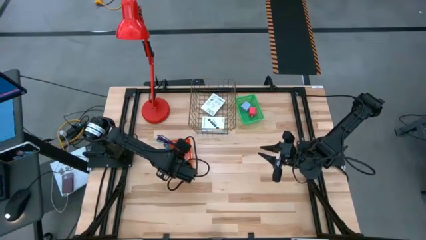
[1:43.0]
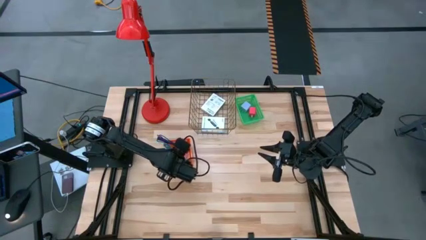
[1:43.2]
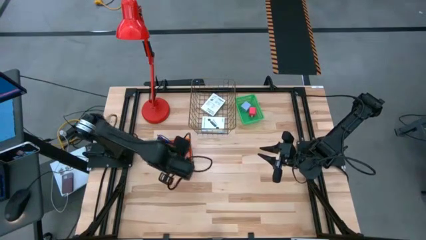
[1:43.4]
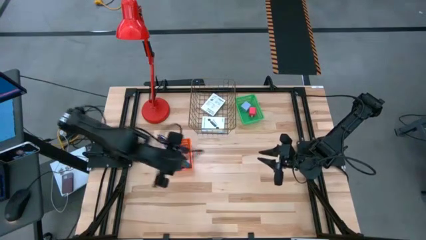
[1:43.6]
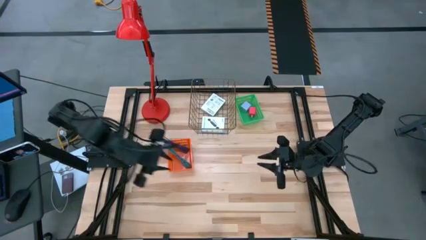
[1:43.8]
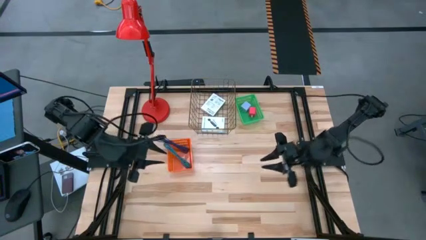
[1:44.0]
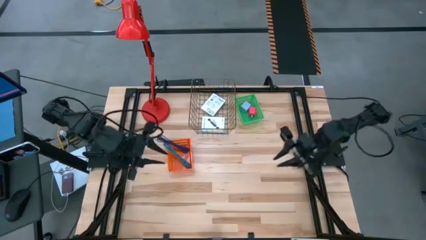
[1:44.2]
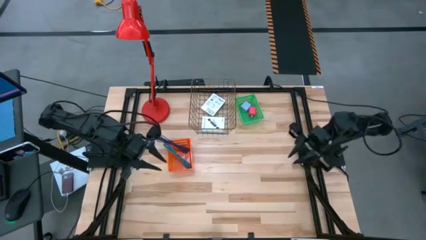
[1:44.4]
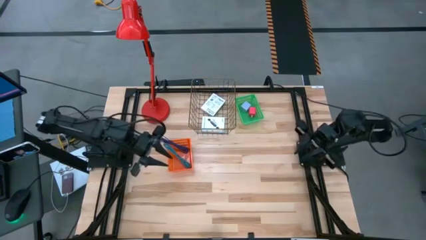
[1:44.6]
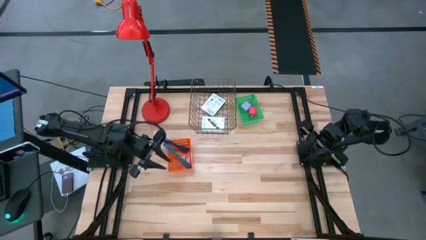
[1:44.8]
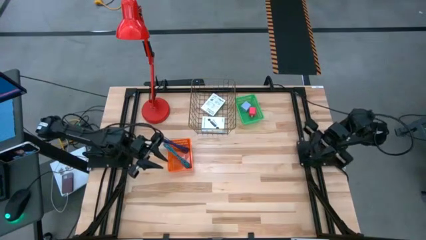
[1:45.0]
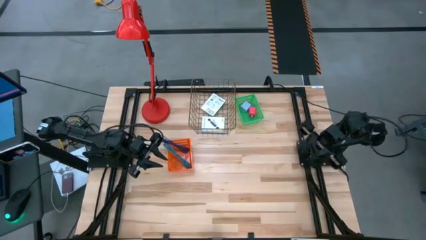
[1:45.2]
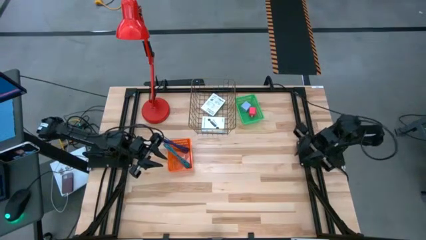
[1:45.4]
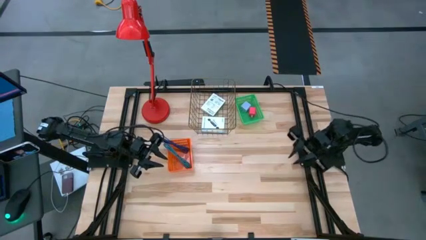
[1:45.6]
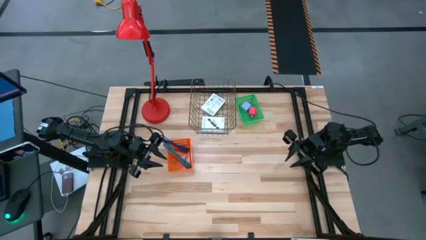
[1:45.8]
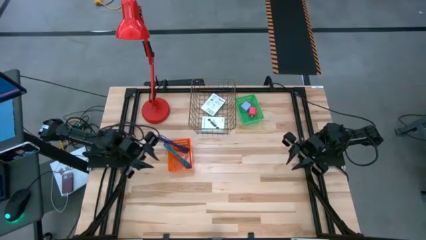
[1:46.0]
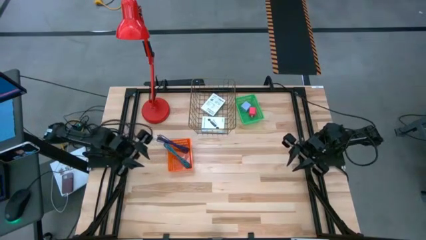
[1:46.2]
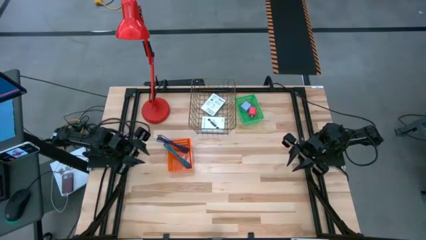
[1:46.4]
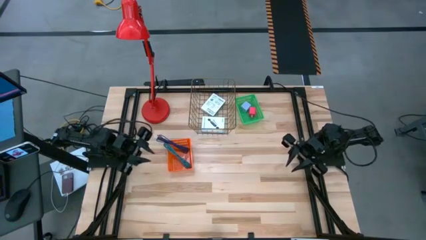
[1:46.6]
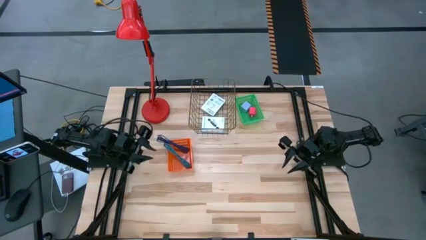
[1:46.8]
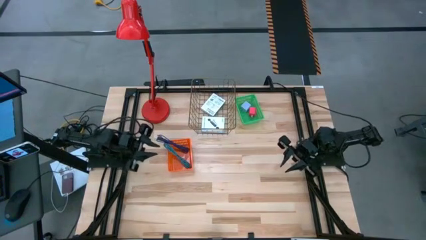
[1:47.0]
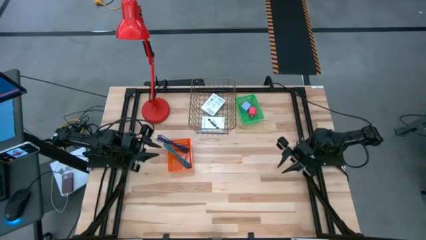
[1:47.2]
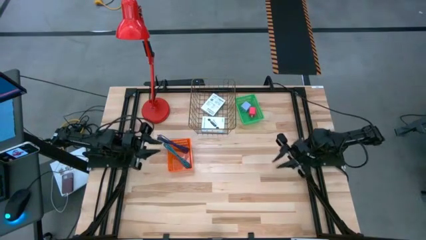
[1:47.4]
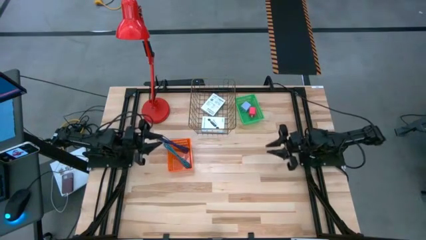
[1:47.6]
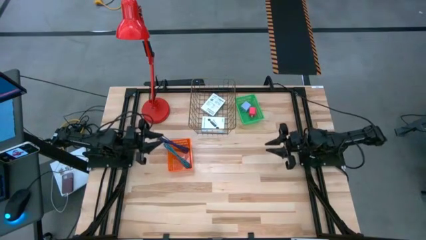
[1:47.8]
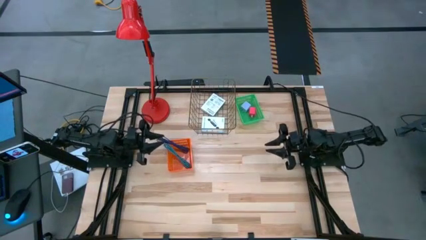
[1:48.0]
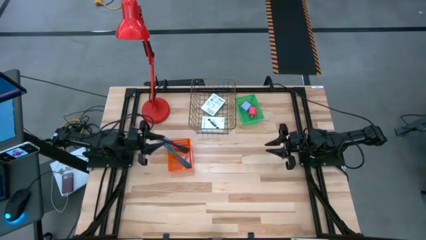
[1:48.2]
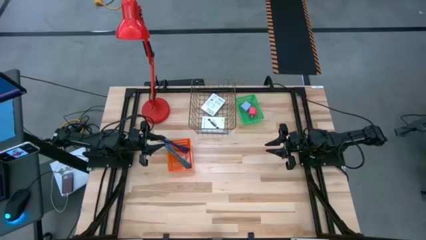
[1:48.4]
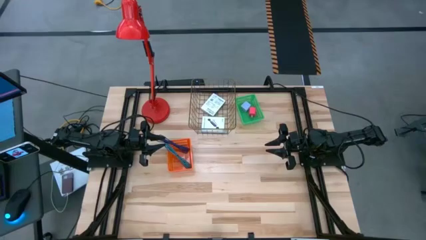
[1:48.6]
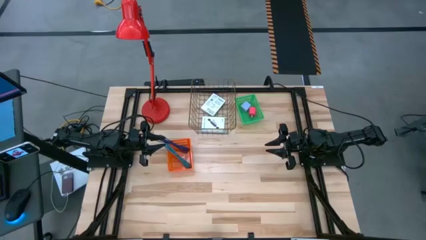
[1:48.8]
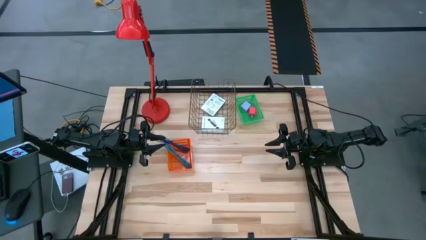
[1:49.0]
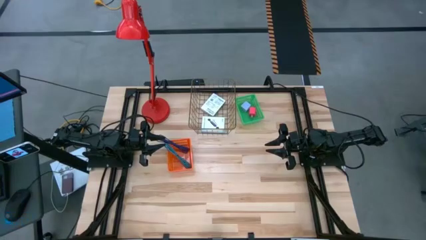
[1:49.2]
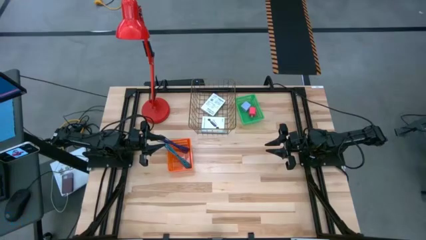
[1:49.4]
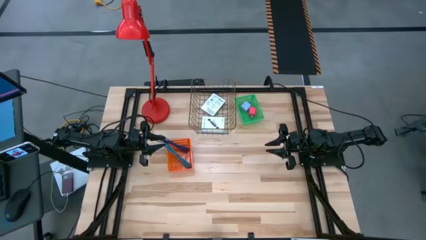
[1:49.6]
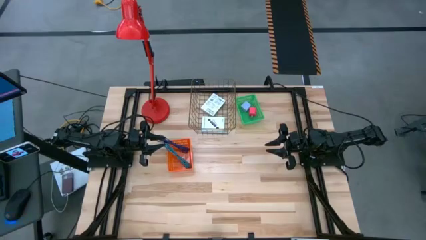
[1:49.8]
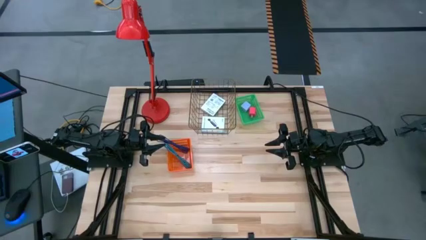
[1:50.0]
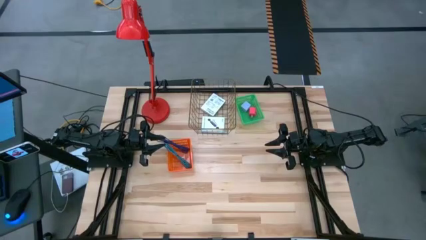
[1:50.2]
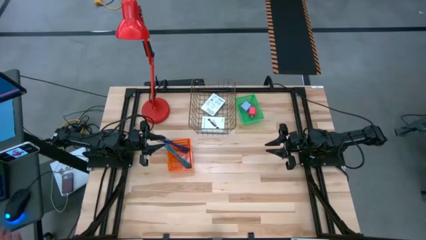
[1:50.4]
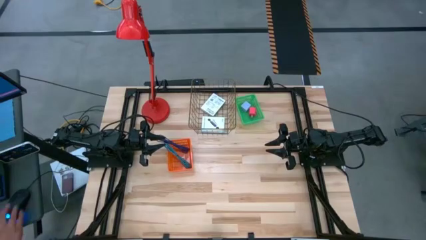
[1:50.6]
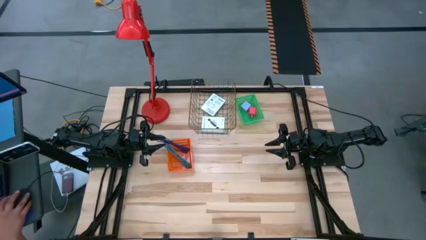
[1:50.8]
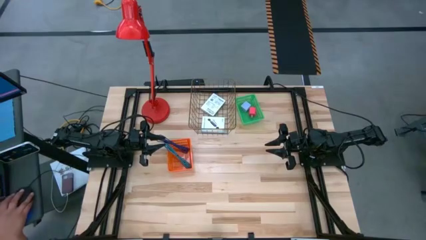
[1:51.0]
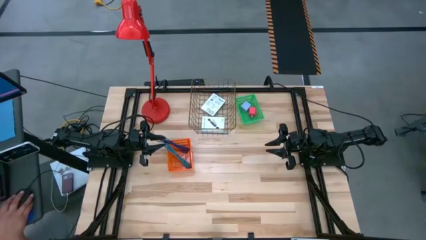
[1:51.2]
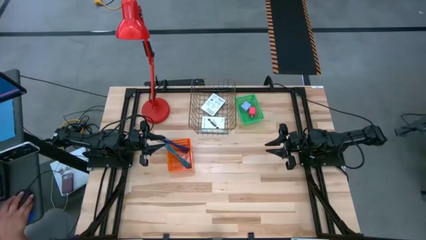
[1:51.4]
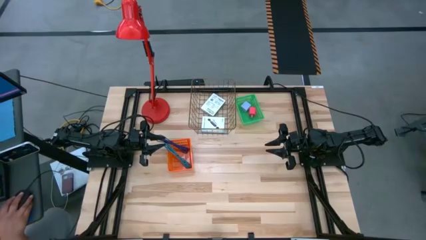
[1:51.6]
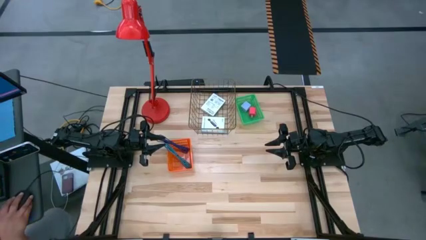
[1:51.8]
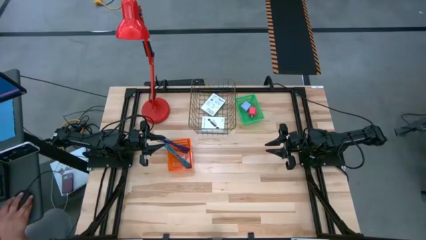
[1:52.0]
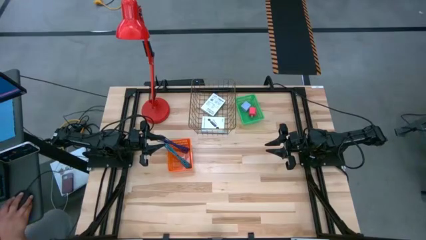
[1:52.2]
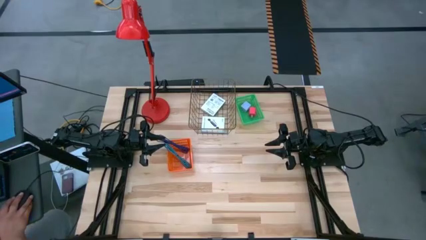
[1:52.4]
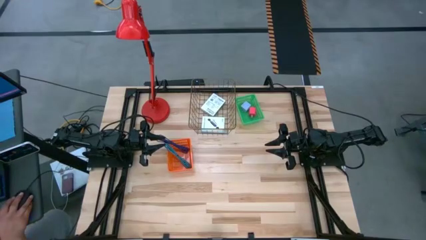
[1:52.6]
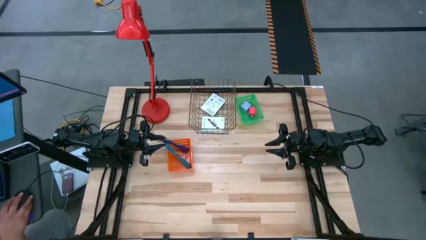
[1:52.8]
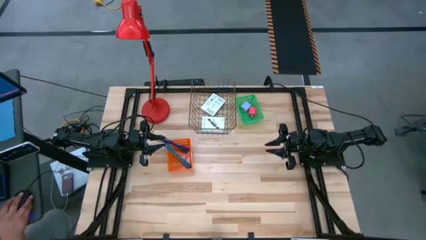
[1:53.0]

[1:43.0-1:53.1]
Task: Pick and place items into bin
Return to Home Position

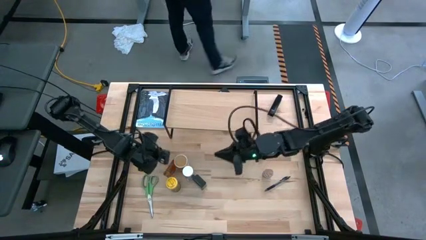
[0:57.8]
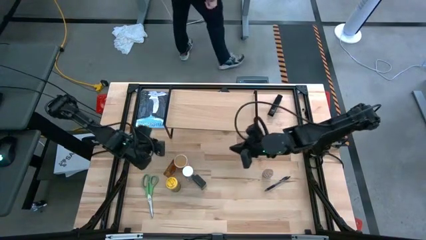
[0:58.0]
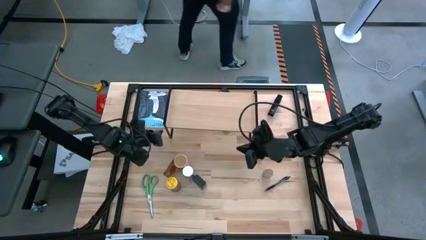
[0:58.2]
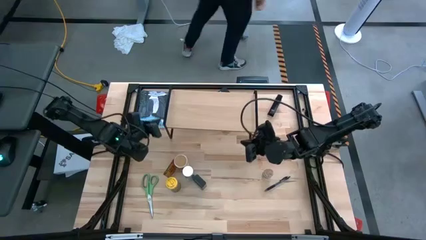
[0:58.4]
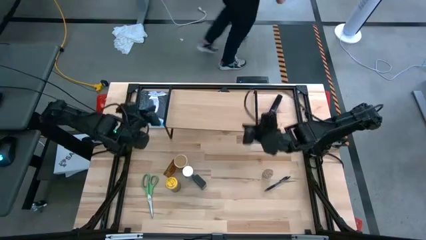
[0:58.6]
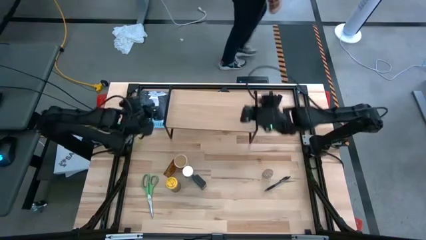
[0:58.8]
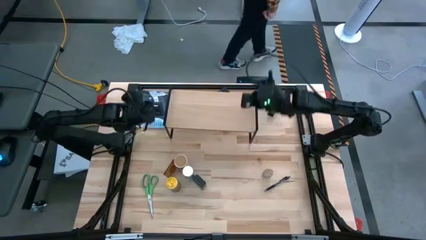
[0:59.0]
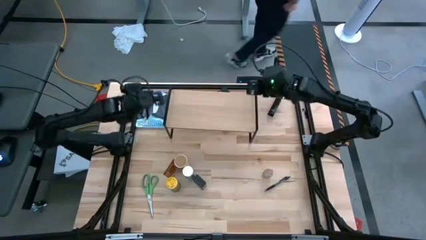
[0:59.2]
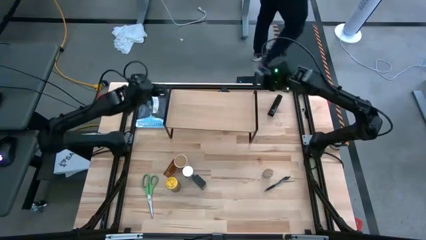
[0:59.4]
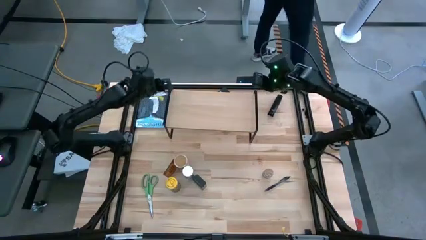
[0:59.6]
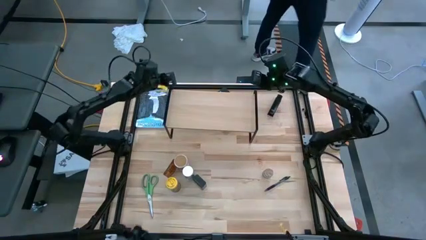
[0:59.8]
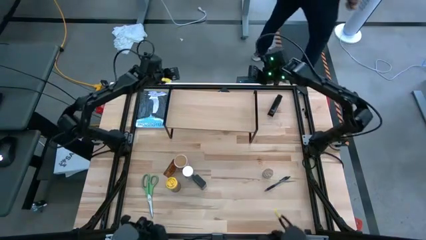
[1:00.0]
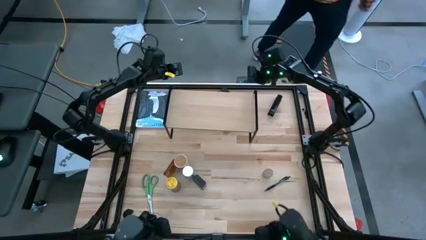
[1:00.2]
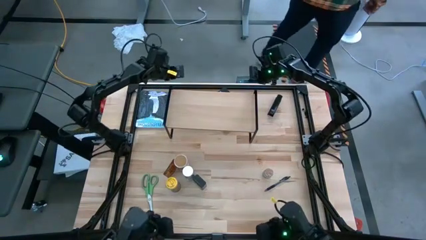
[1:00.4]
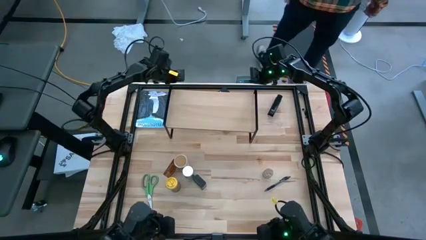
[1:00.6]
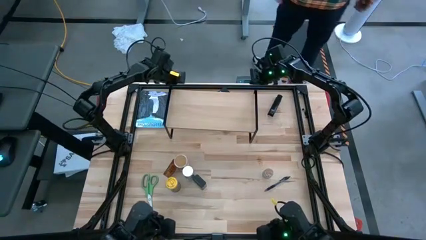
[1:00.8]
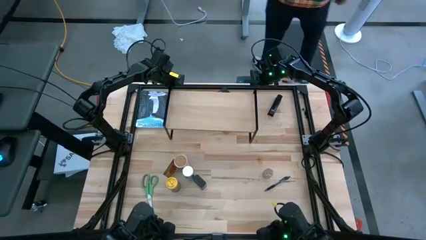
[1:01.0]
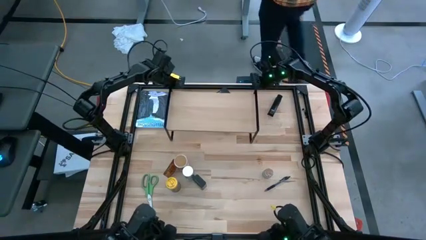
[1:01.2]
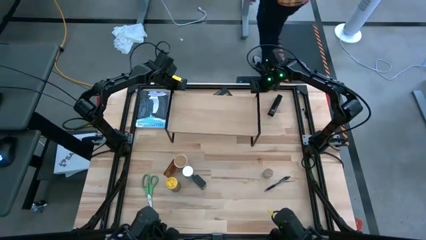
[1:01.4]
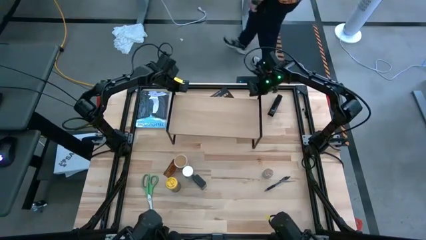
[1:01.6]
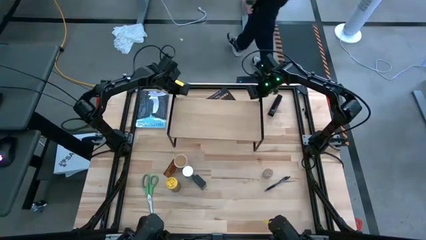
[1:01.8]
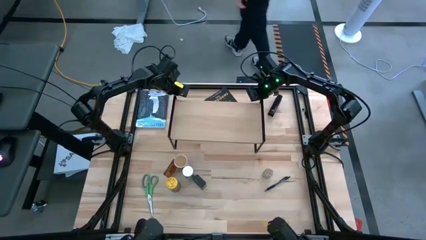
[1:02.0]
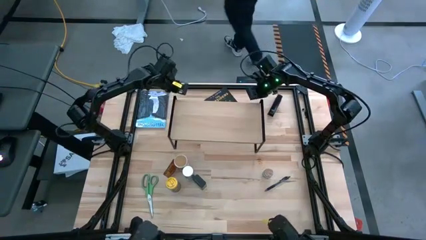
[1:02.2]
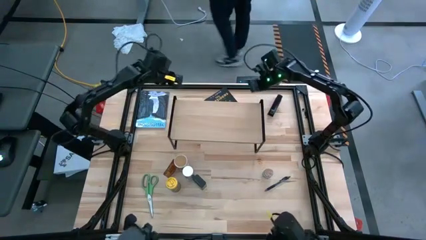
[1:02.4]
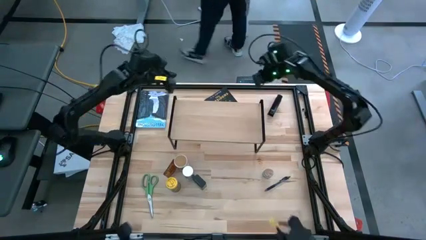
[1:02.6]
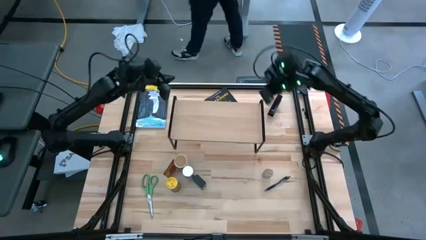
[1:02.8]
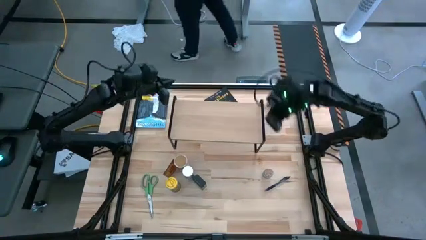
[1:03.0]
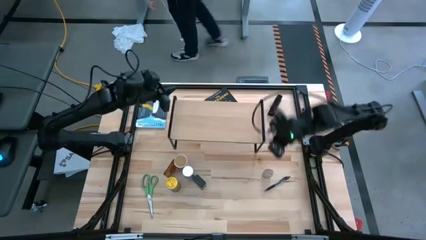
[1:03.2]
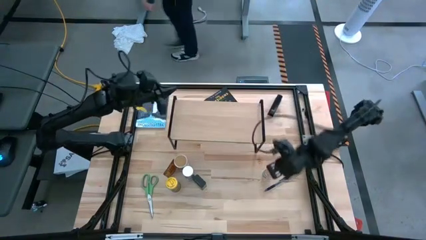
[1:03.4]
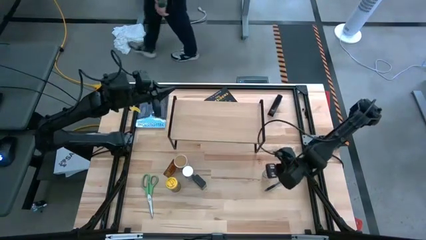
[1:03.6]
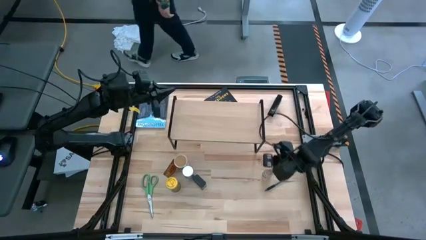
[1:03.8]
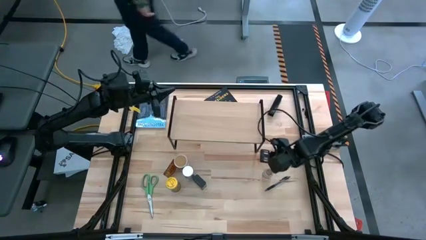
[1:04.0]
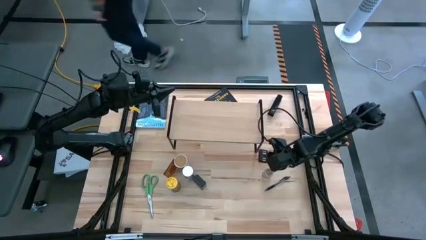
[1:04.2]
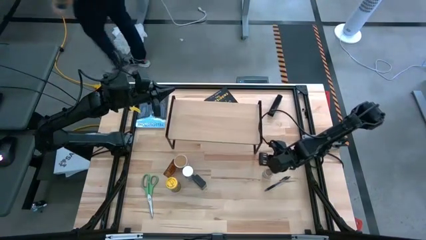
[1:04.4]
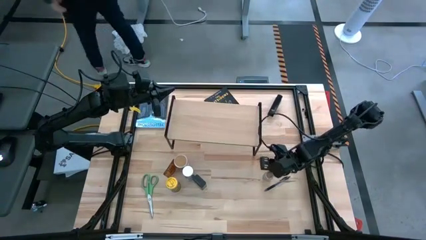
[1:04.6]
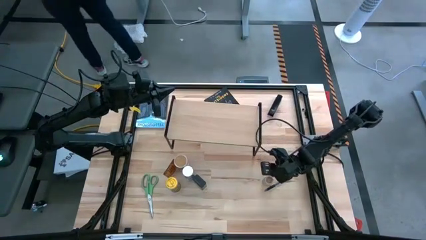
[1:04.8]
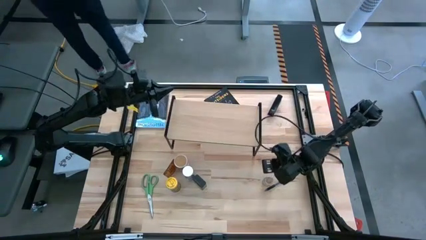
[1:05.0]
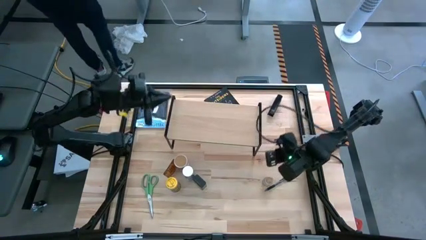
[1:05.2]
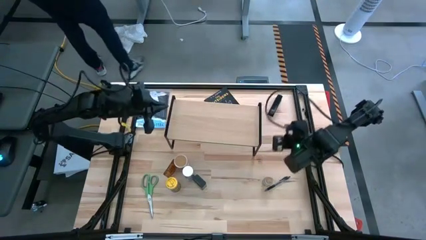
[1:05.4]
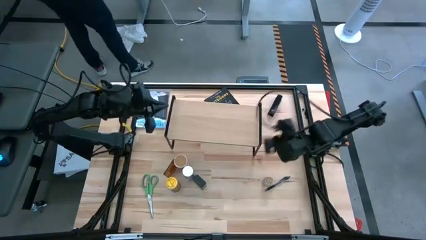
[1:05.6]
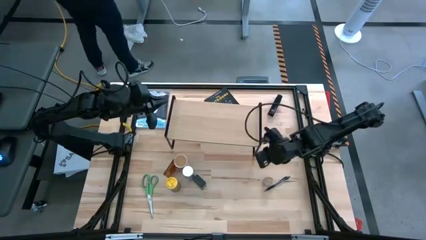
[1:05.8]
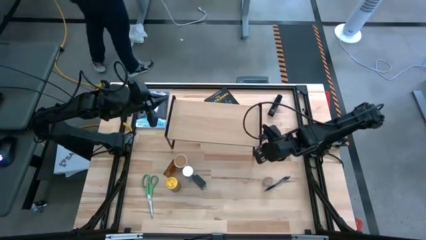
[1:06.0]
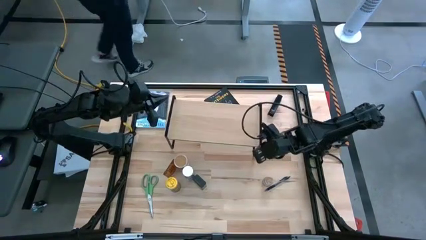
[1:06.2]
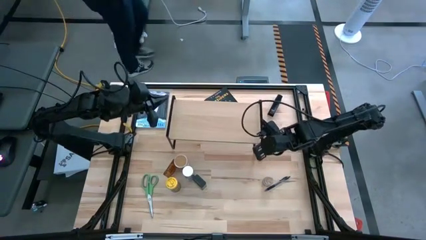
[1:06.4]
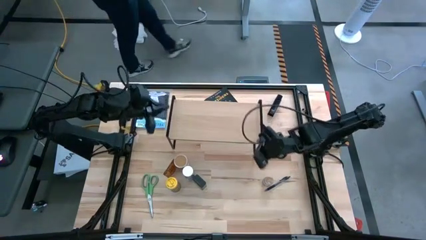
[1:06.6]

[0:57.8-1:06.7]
Task: Shelf spices
Adjust the shelf
